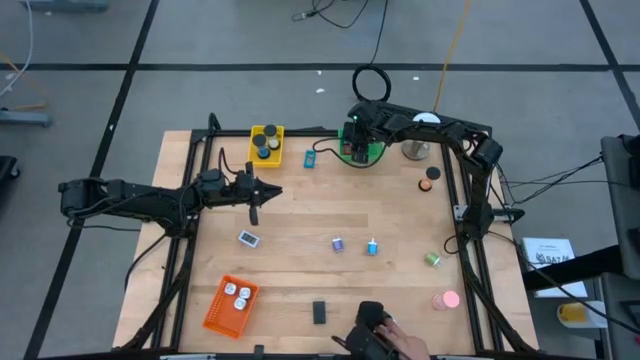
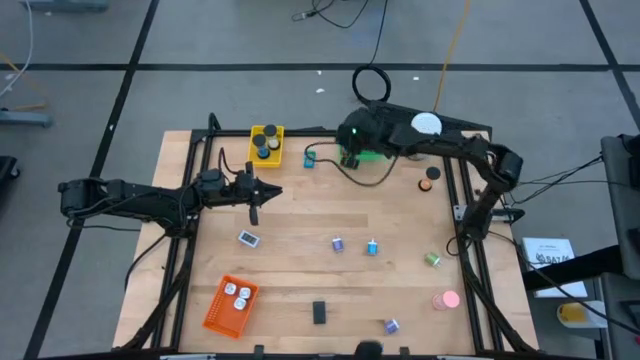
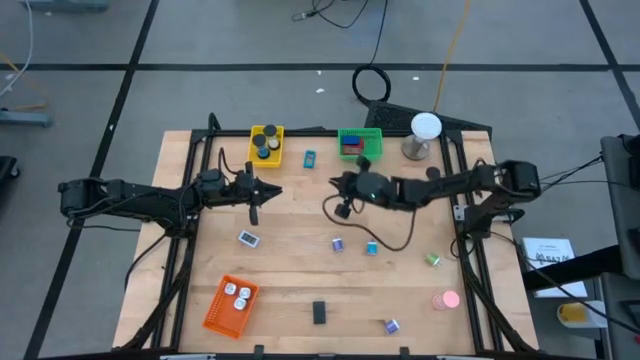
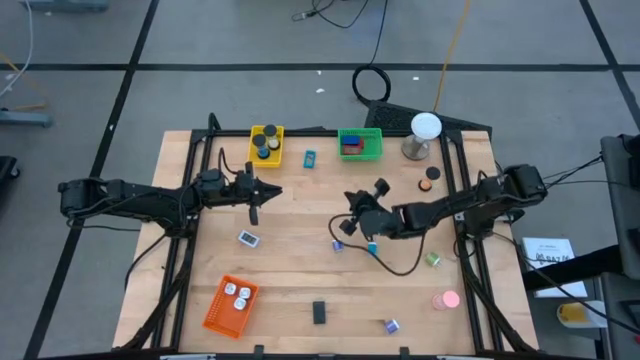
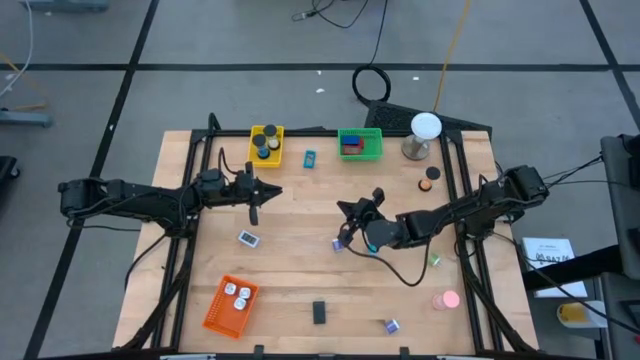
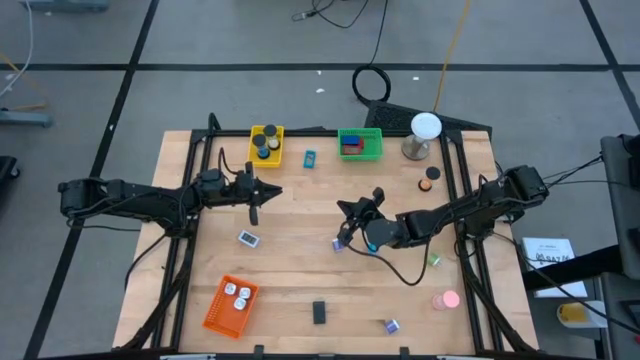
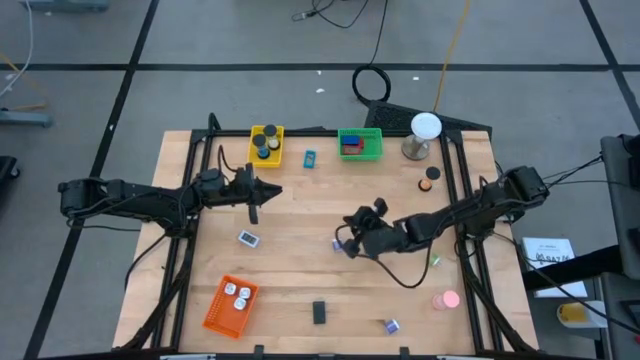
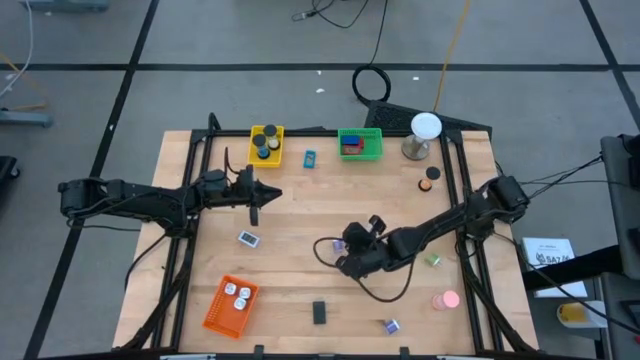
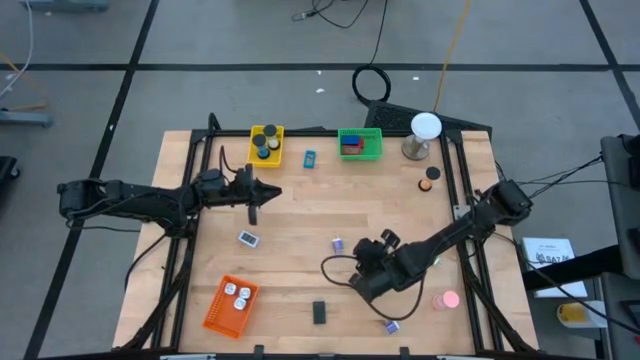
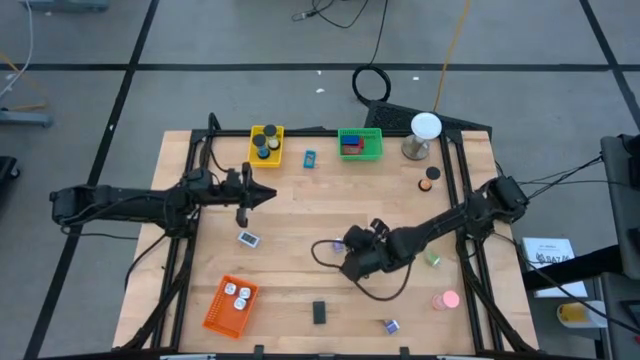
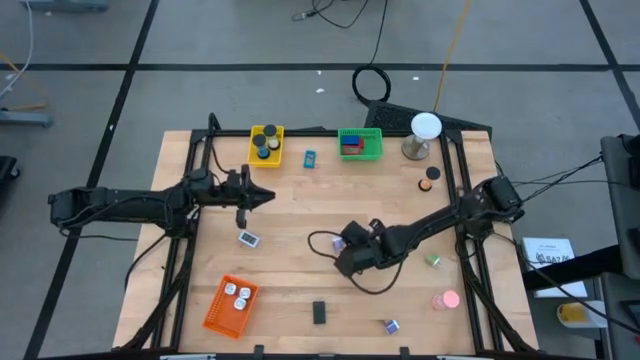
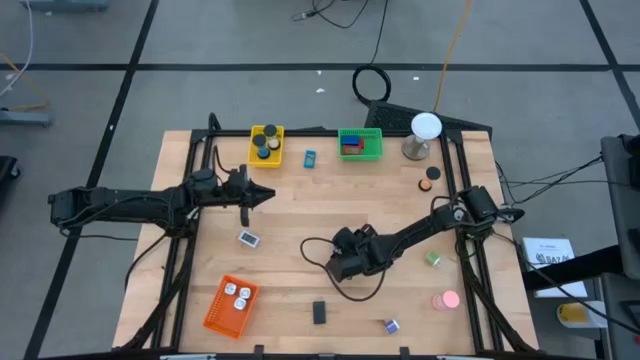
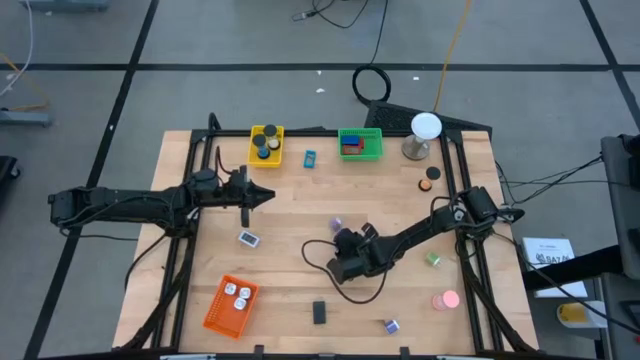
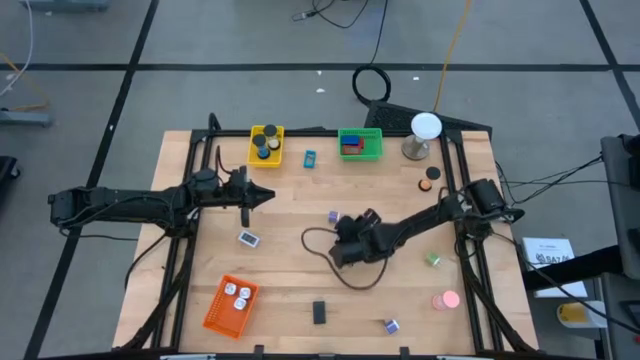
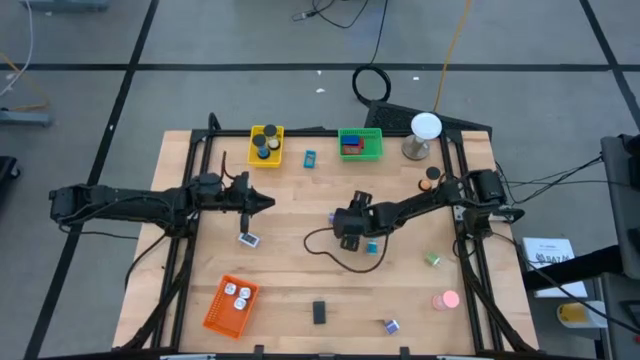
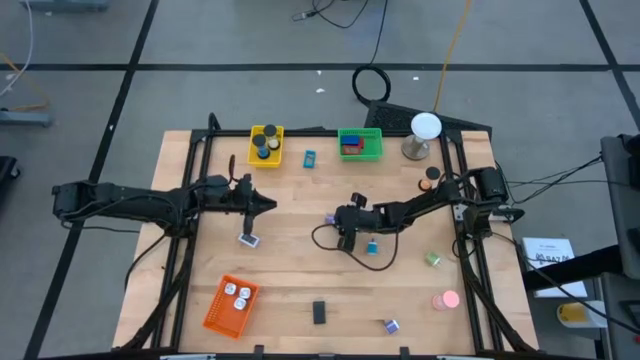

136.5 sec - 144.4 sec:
Task: Pick & Place Office items
Put the top purple charger adapter into the orange bin

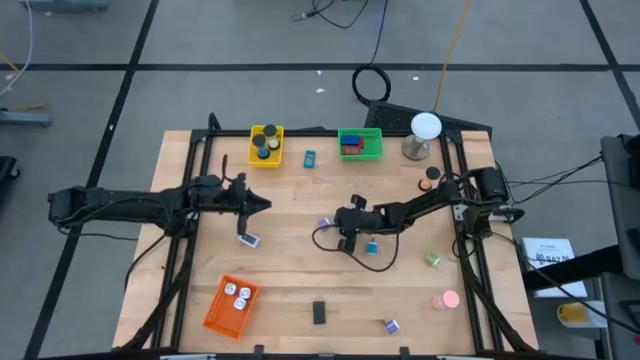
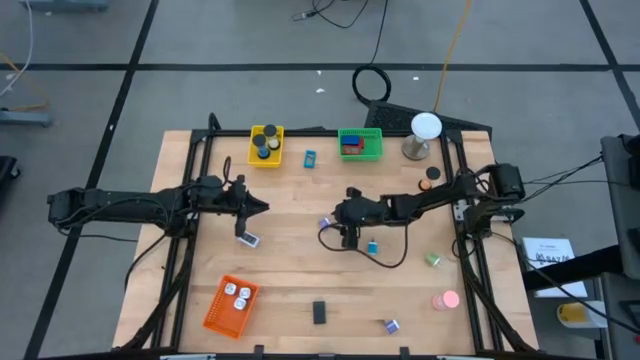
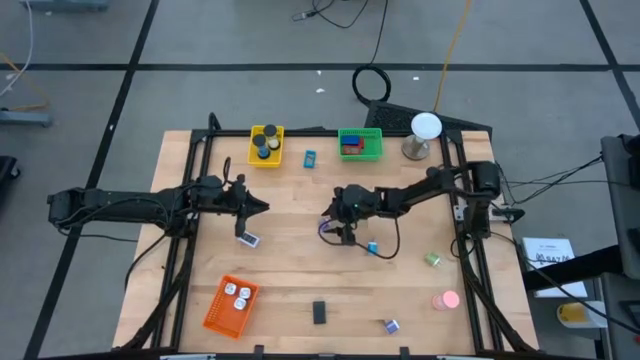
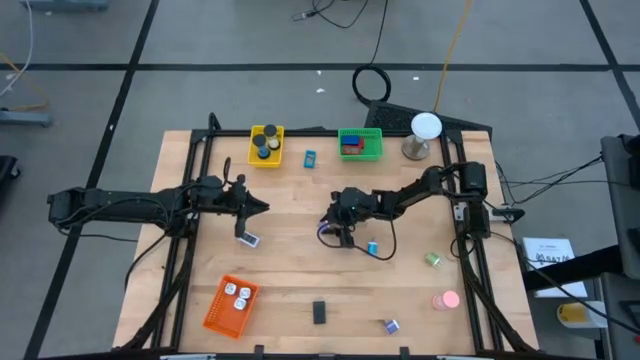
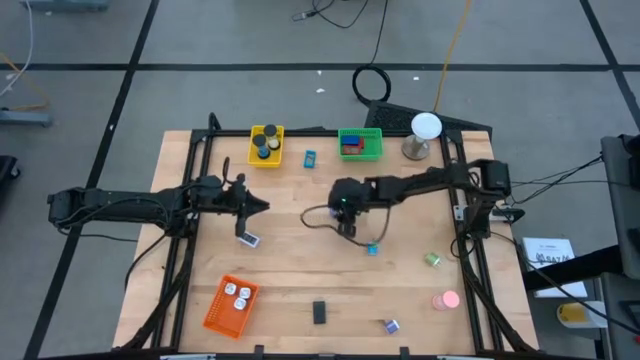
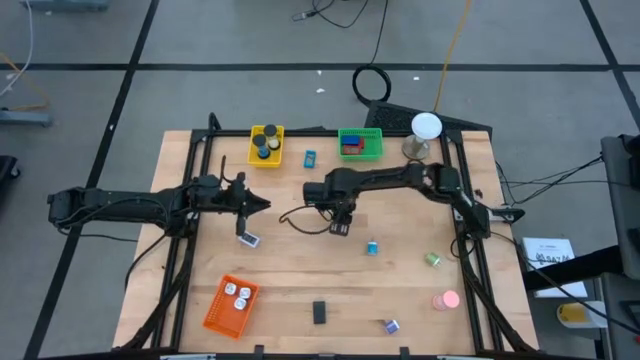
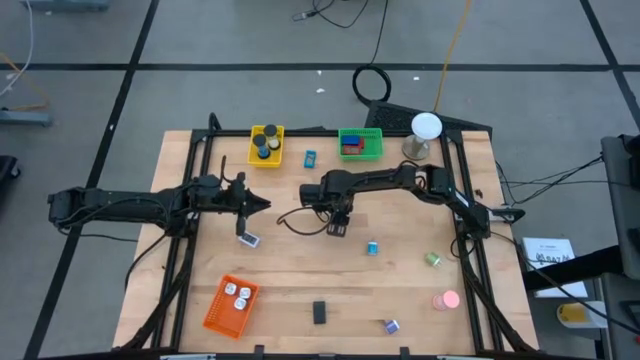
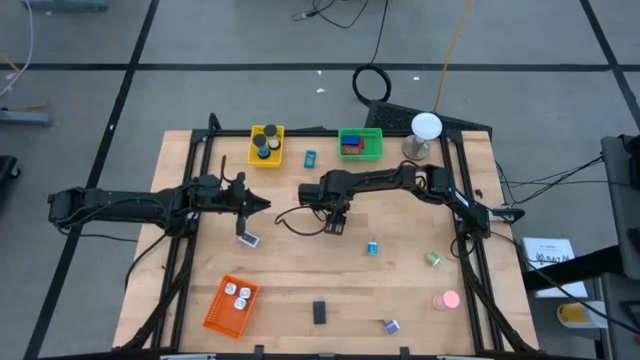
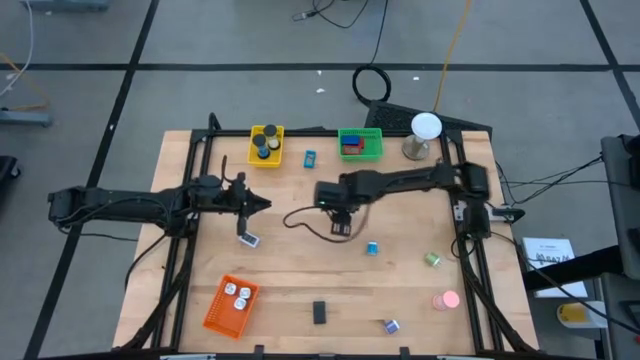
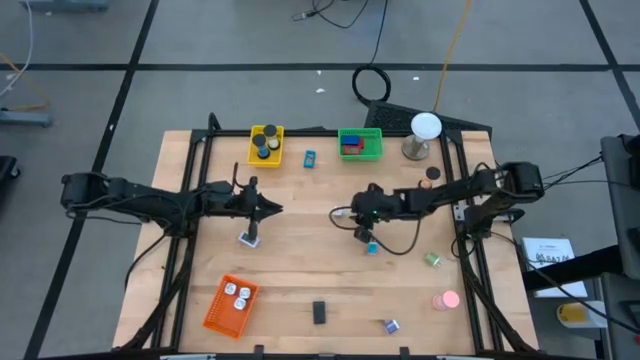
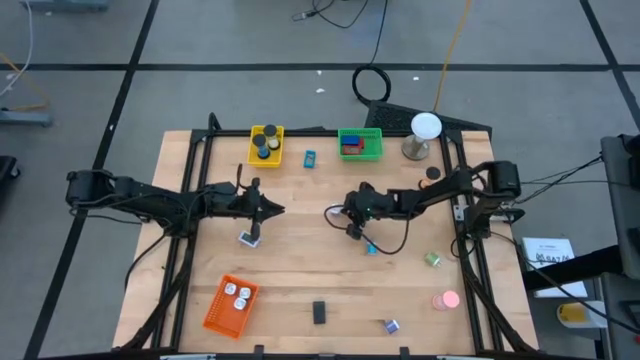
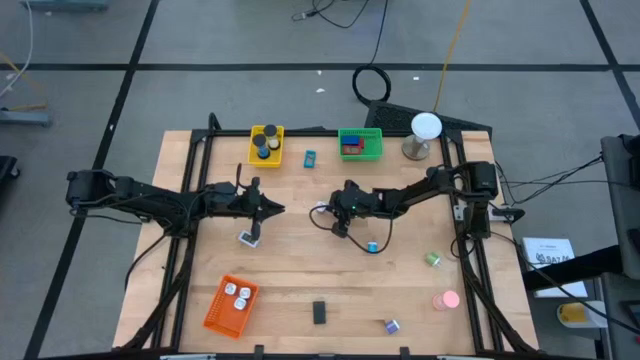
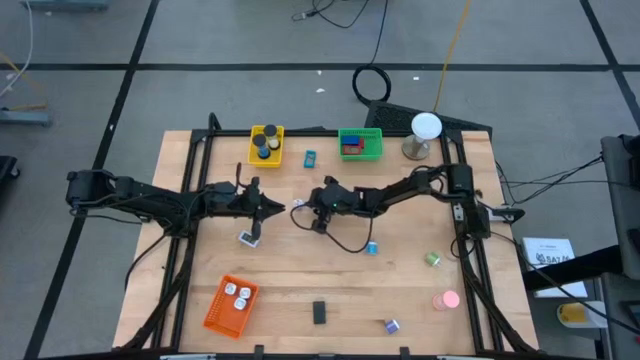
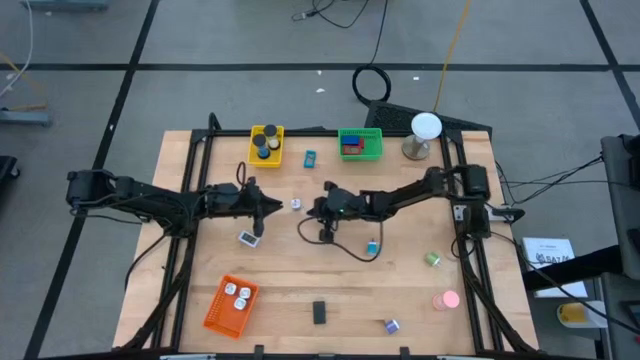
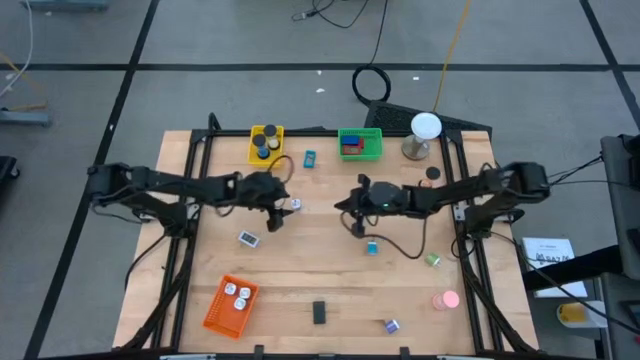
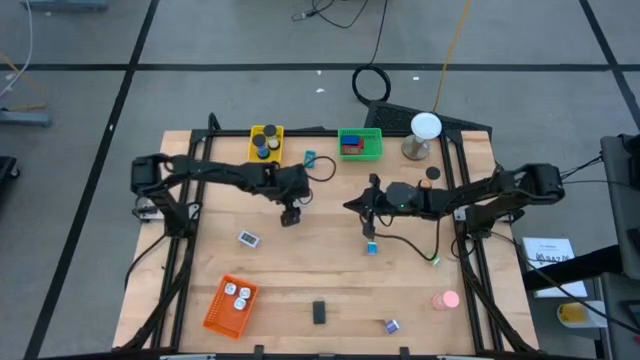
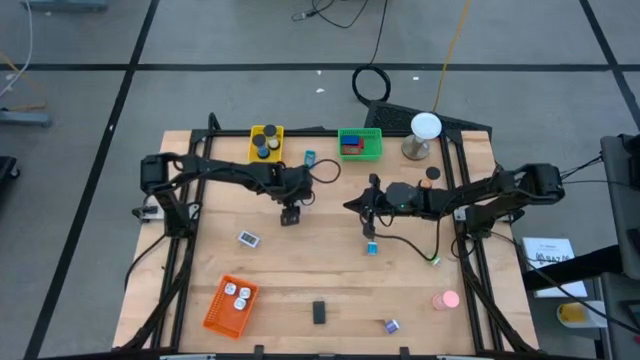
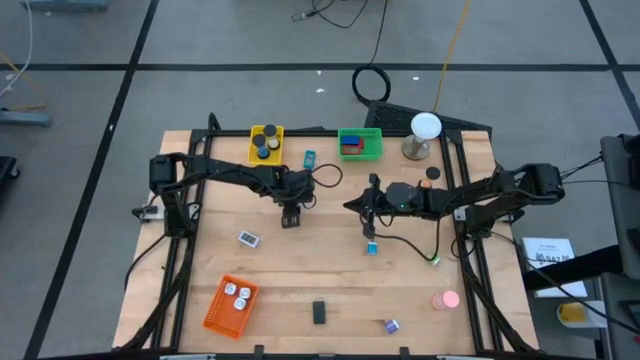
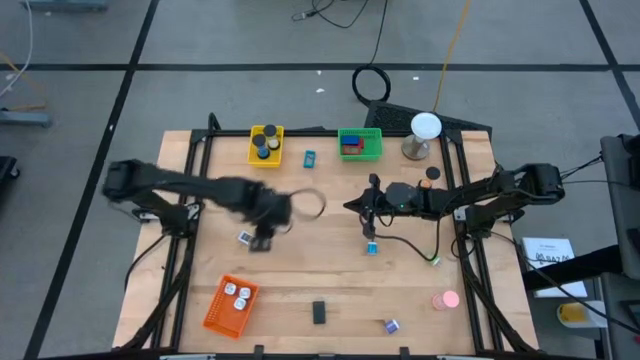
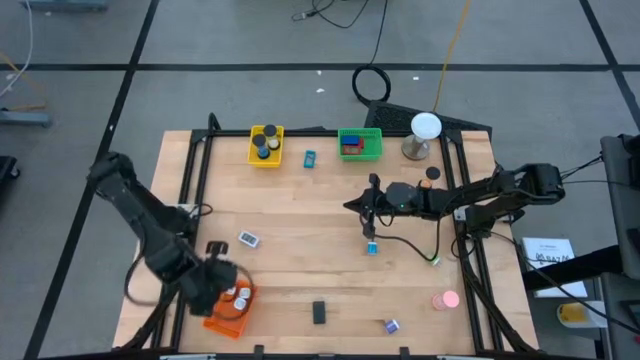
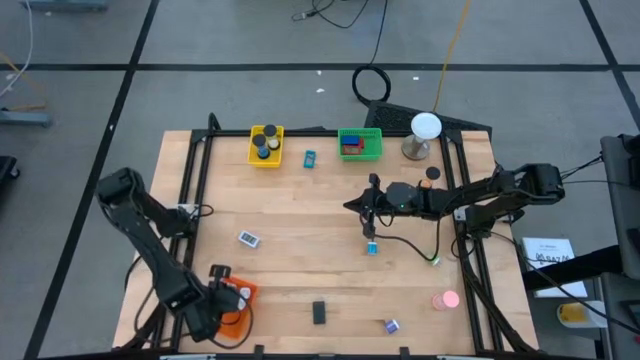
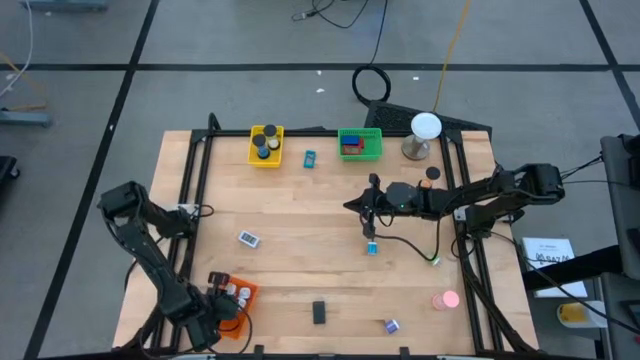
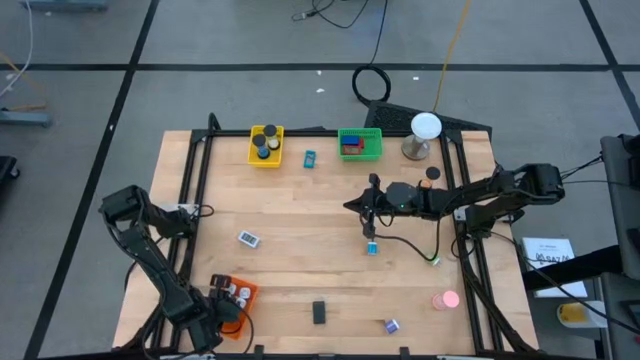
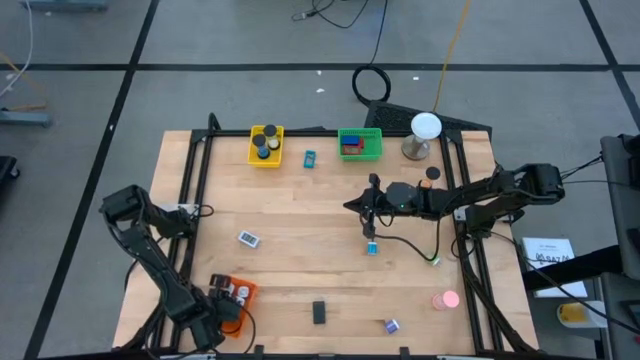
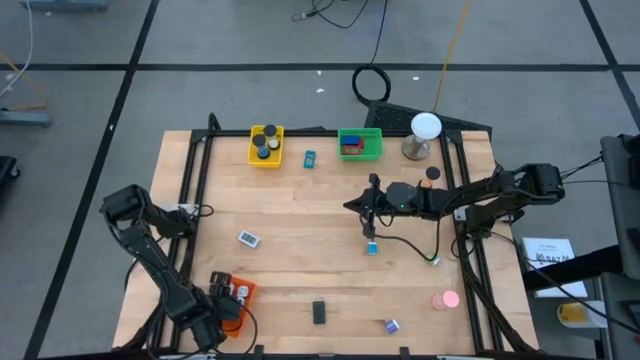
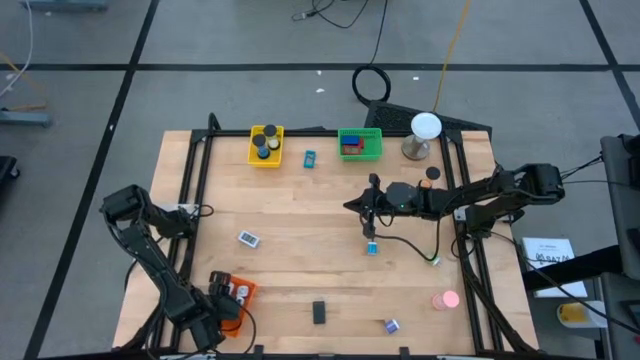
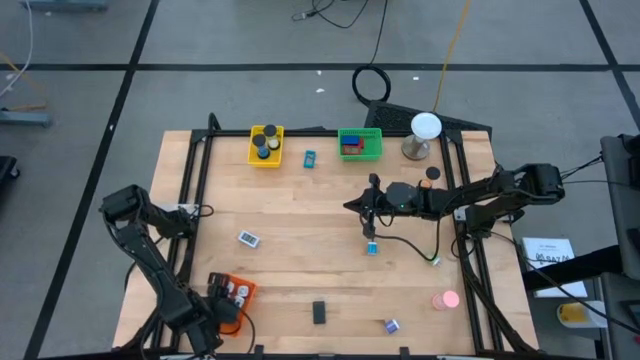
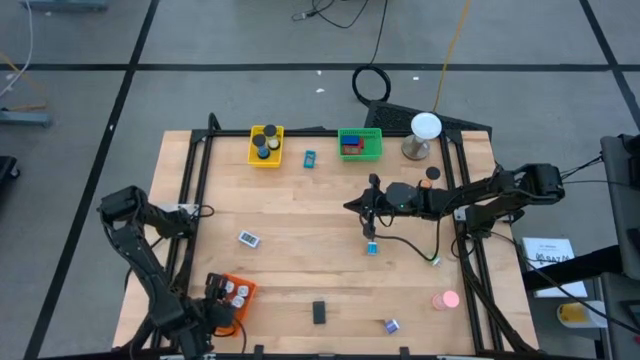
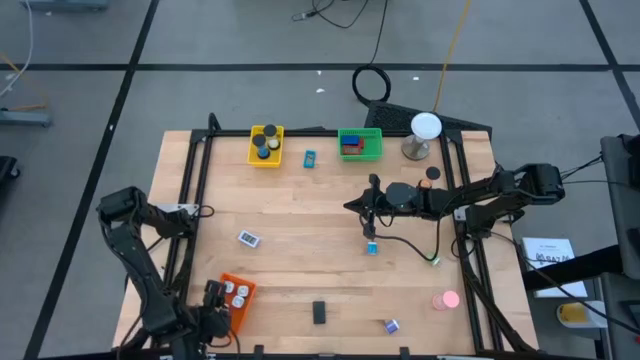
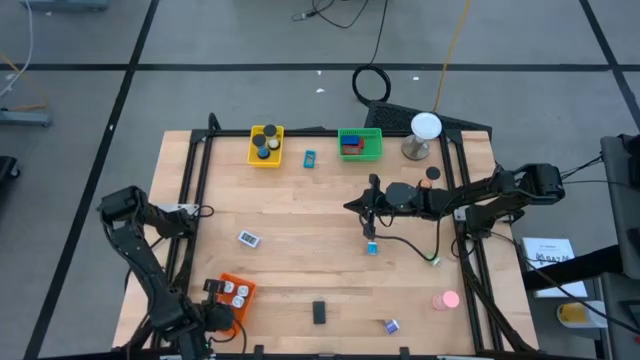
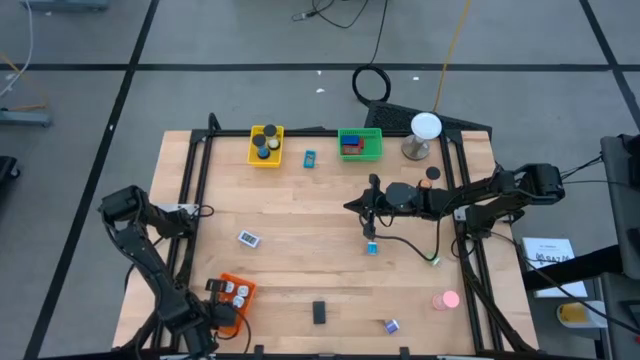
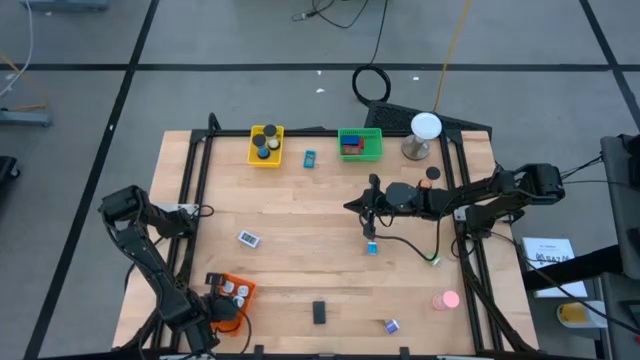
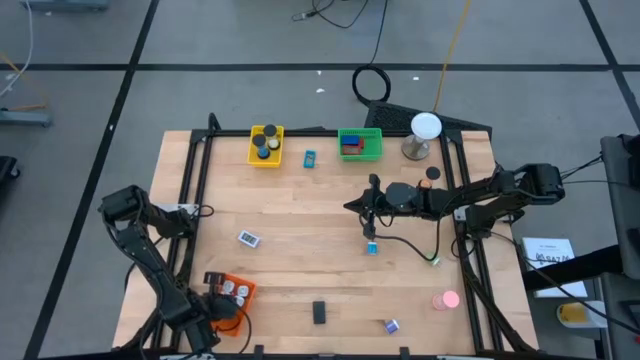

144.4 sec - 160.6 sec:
Put the top purple charger adapter into the orange bin
